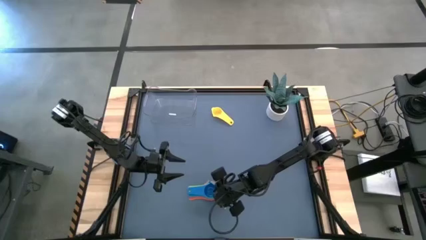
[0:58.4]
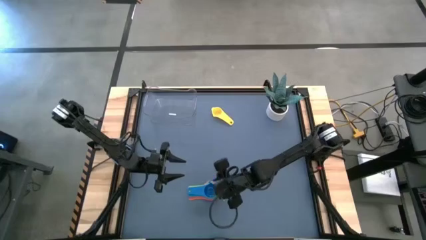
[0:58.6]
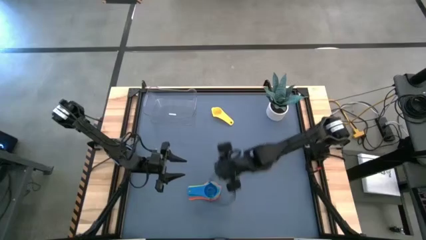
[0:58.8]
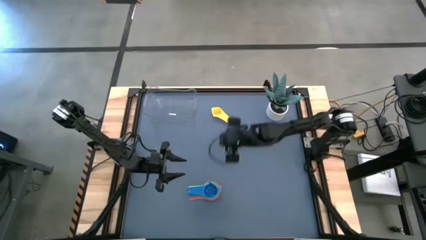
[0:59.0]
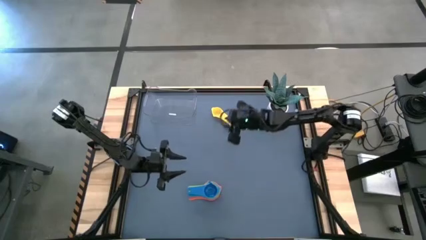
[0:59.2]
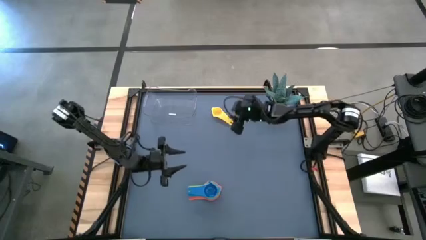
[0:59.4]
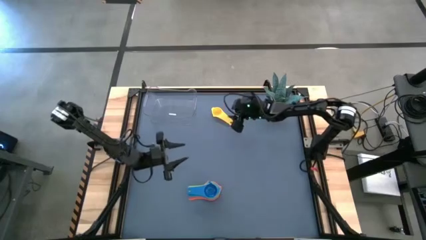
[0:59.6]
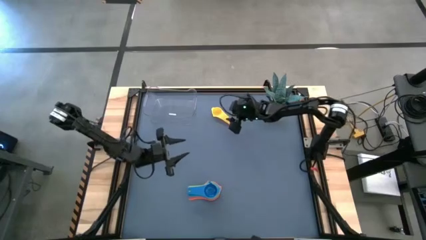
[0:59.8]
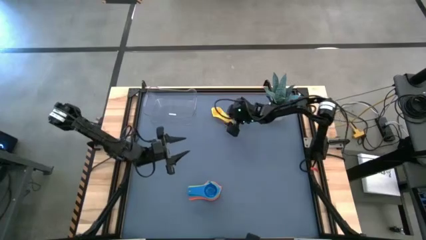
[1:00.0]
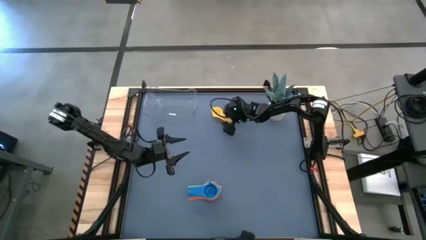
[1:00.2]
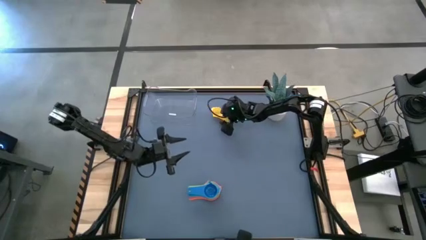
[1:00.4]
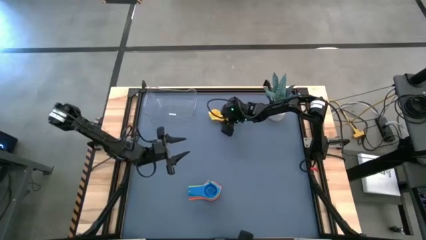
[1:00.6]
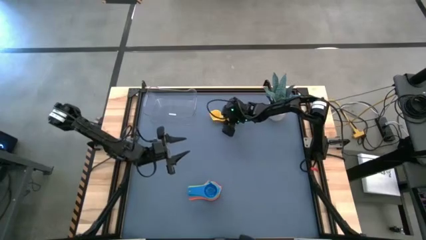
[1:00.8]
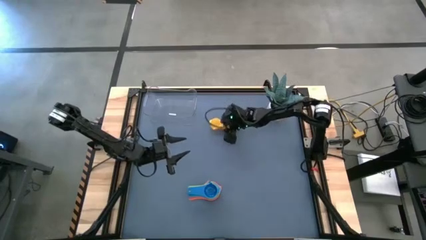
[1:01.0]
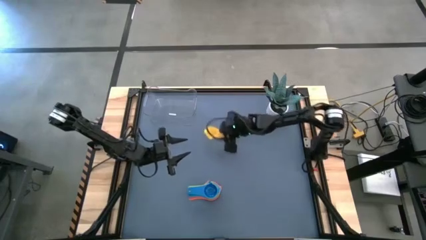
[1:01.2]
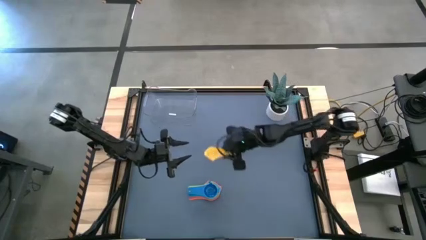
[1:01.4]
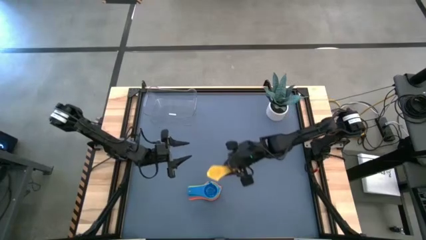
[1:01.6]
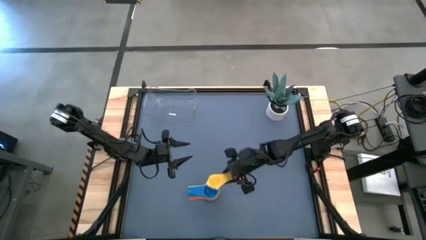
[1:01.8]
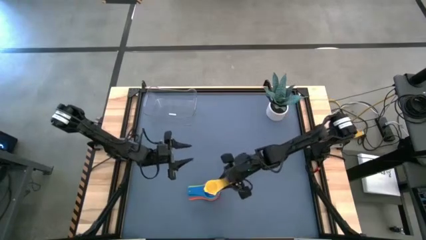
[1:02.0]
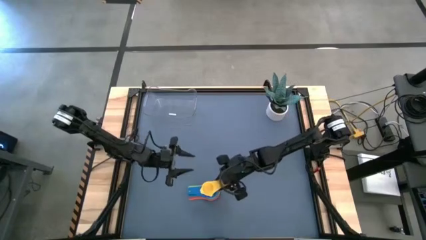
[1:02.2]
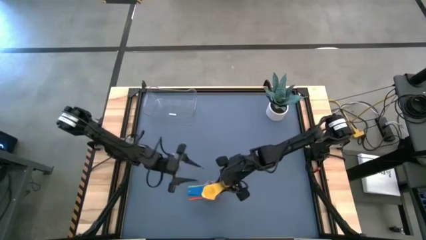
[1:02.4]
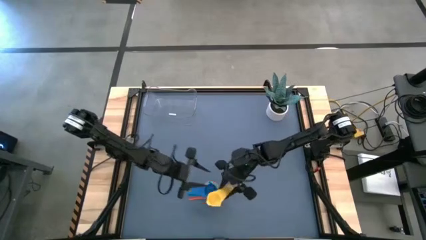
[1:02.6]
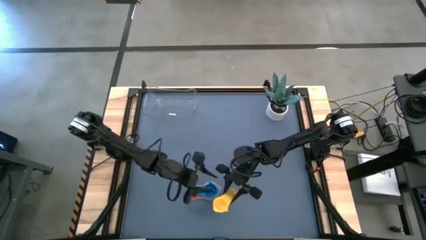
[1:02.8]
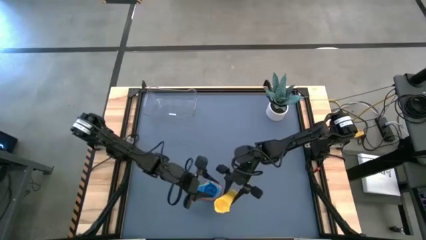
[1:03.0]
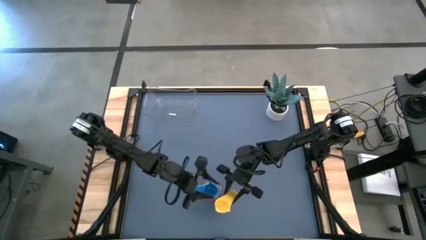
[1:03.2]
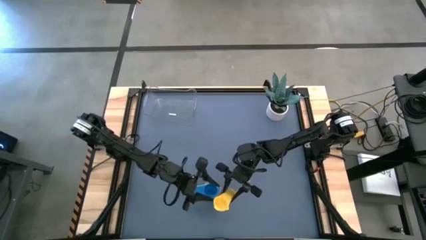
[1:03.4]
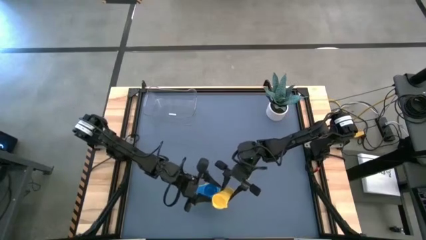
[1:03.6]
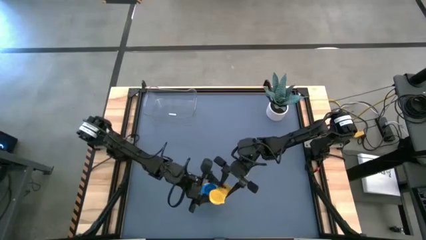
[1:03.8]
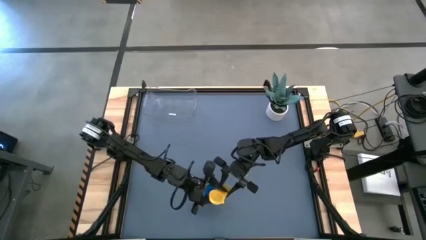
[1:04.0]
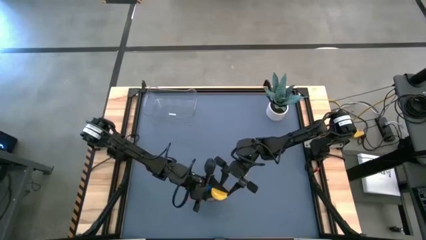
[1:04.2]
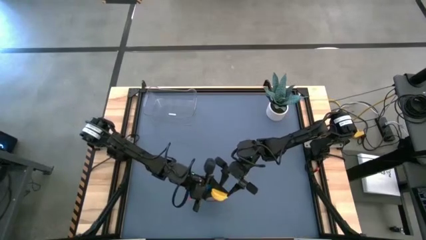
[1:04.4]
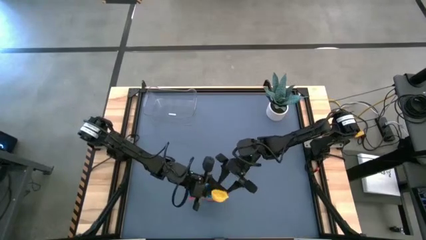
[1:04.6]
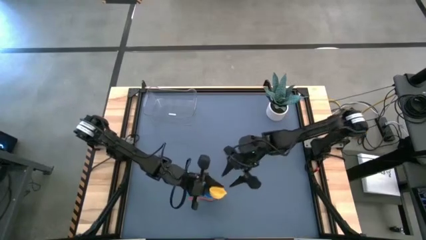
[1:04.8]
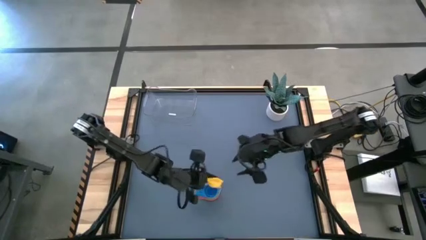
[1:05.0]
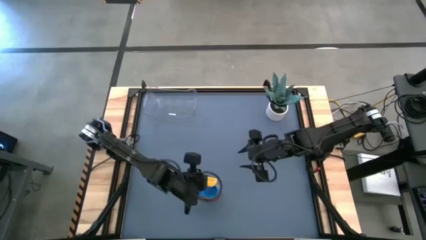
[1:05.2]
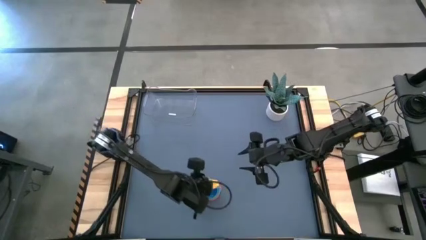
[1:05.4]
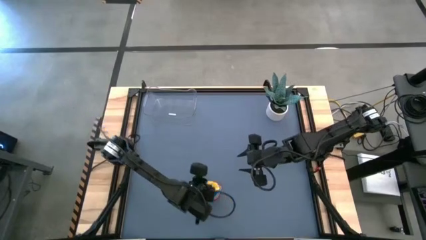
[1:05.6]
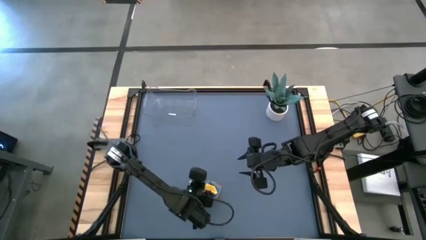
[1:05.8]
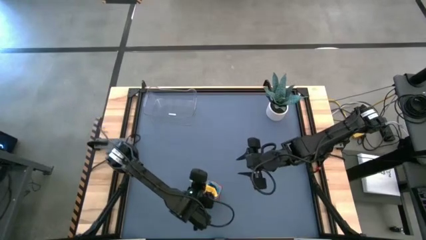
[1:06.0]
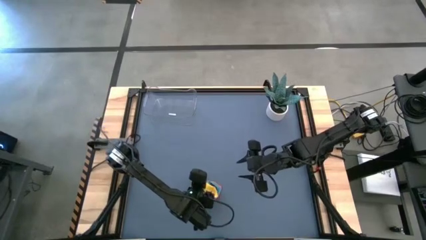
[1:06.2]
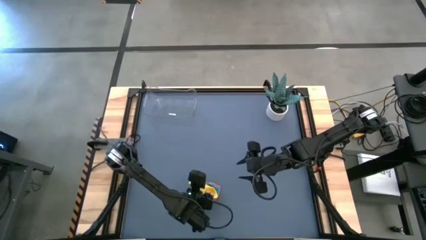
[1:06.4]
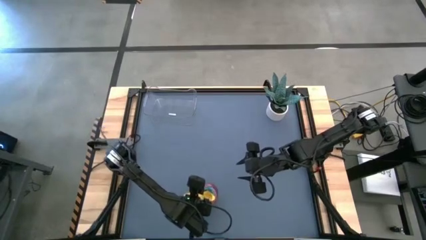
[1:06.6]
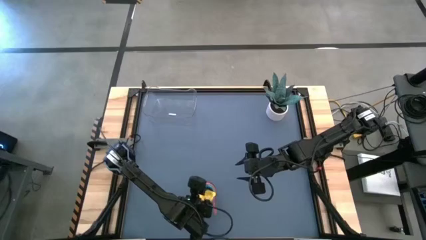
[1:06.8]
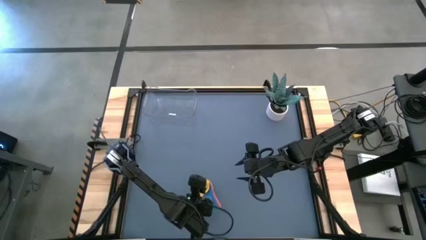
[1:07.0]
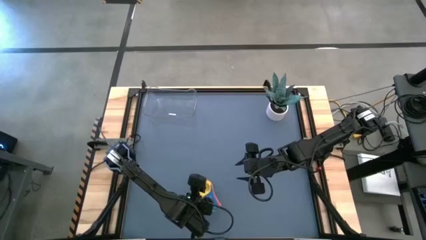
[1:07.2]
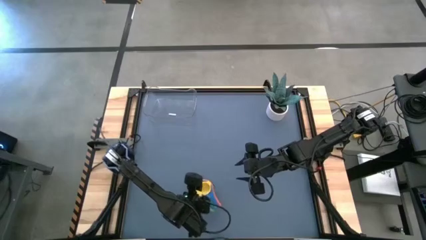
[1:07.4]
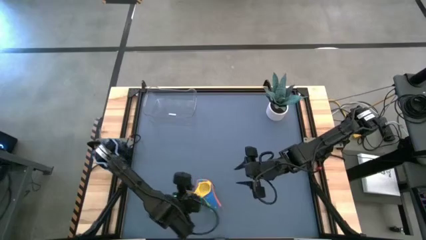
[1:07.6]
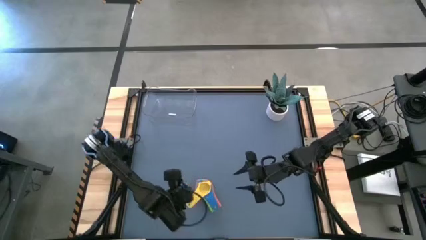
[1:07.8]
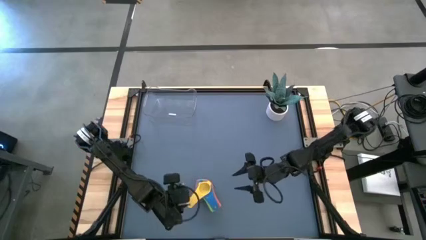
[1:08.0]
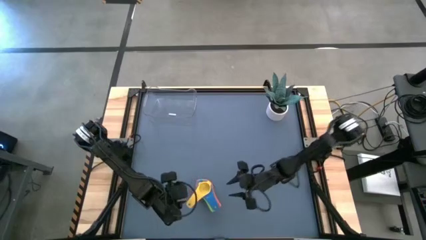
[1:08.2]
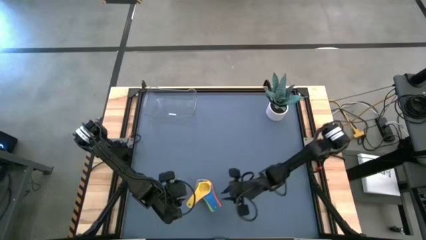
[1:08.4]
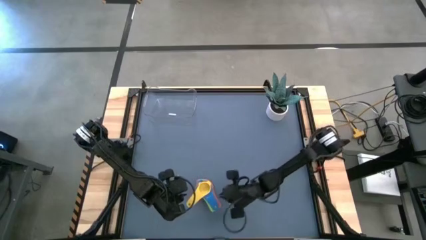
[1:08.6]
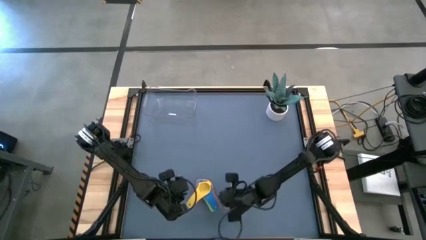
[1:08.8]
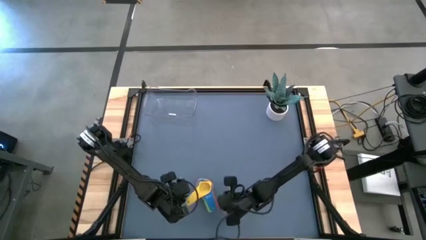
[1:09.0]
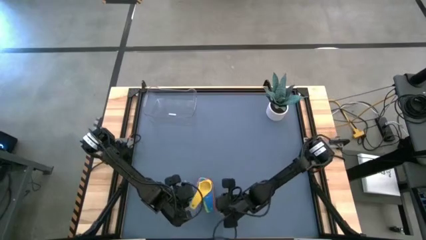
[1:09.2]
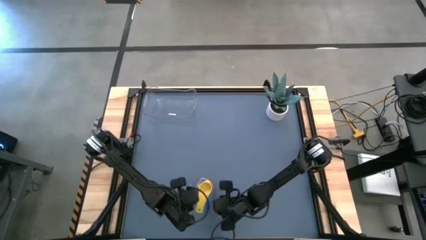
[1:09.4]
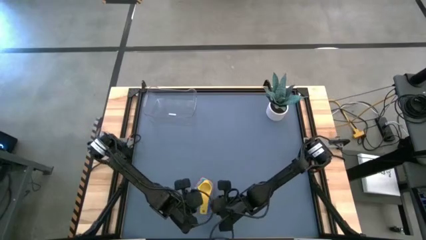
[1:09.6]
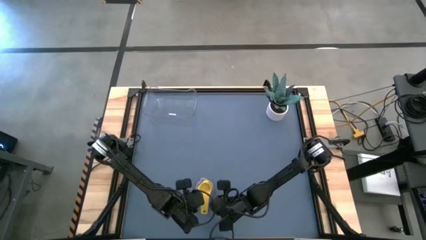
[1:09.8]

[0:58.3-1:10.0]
Task: Nest measuring cups in basket
Stack the yellow measuring cup on the top of the blue measuring cup

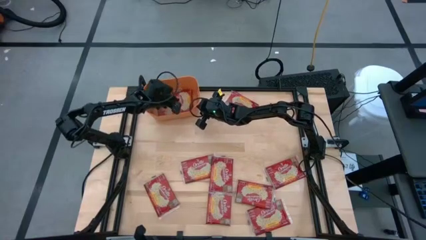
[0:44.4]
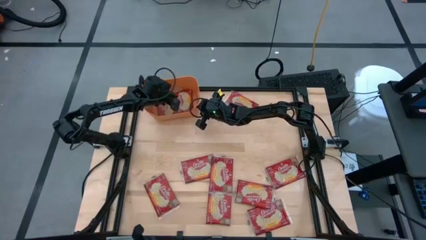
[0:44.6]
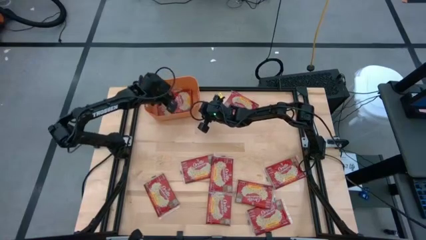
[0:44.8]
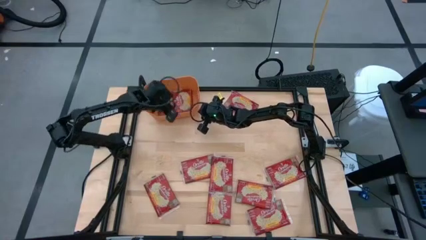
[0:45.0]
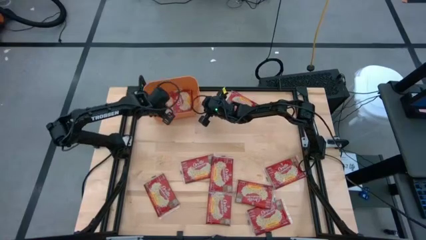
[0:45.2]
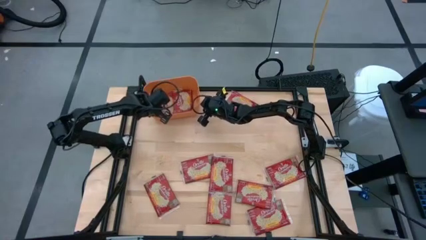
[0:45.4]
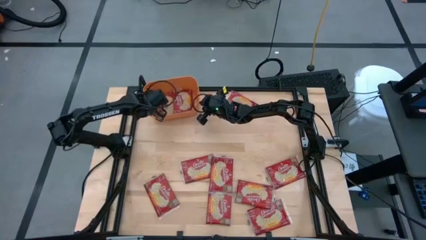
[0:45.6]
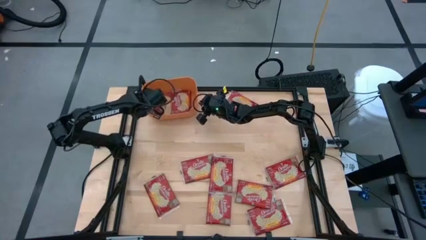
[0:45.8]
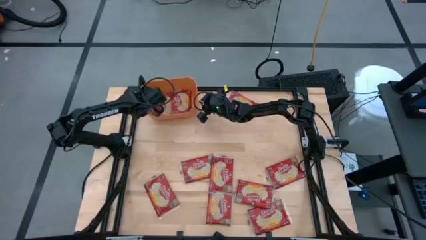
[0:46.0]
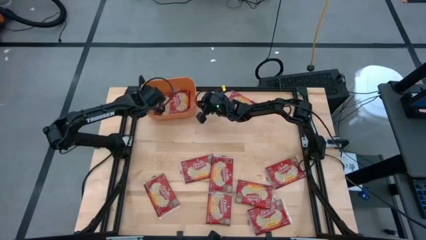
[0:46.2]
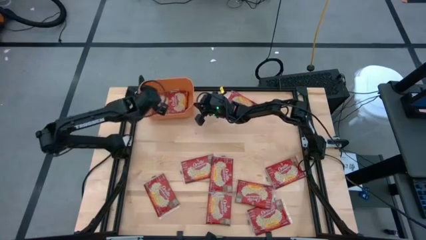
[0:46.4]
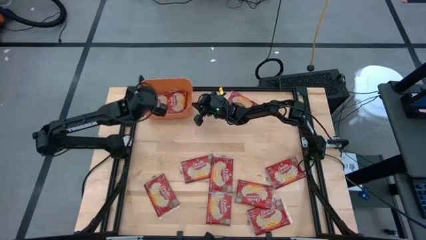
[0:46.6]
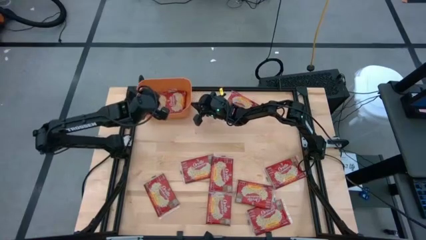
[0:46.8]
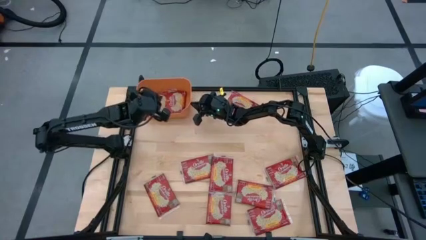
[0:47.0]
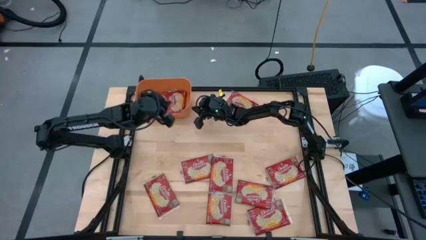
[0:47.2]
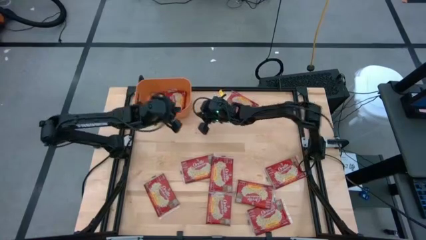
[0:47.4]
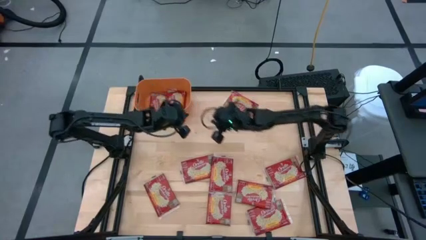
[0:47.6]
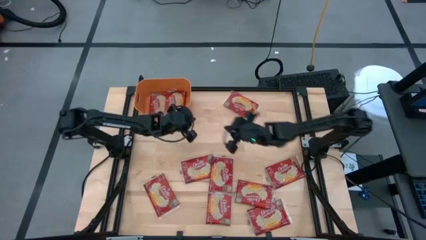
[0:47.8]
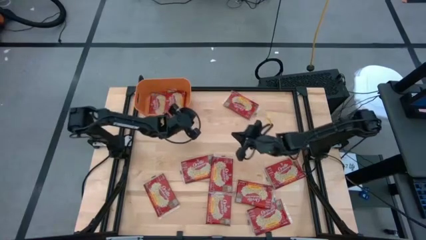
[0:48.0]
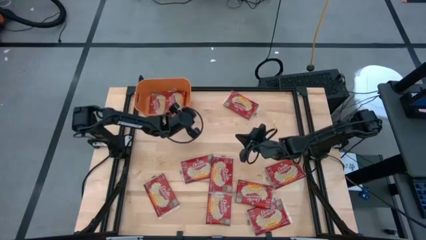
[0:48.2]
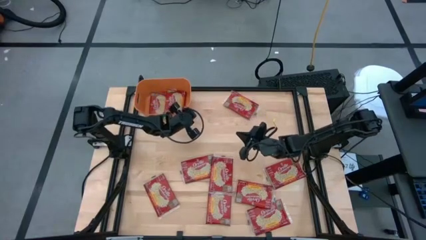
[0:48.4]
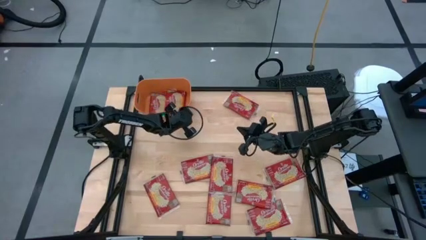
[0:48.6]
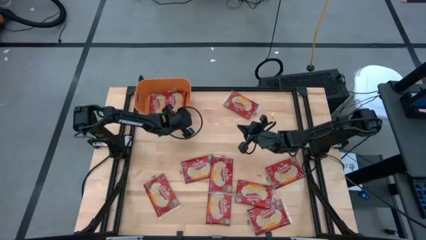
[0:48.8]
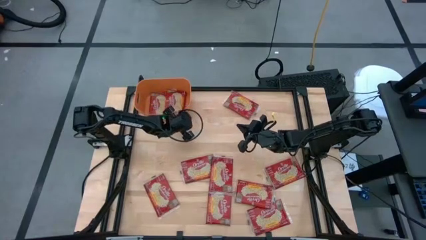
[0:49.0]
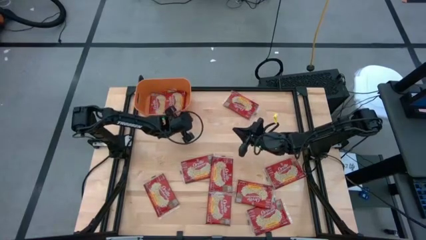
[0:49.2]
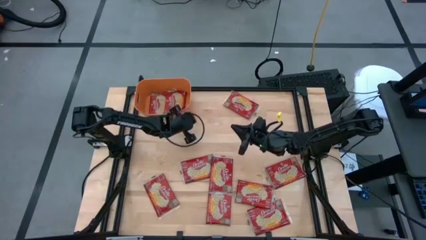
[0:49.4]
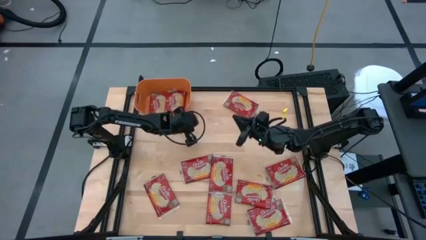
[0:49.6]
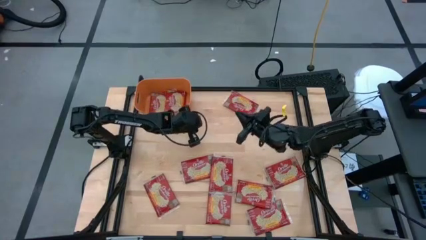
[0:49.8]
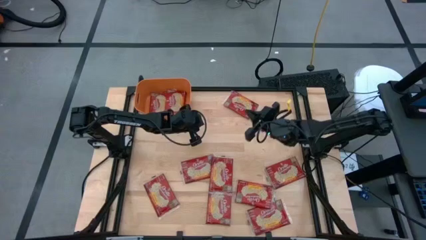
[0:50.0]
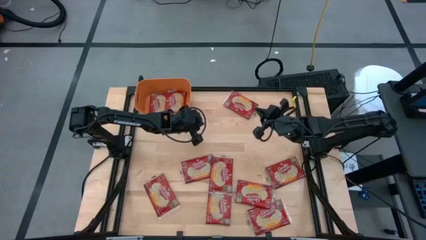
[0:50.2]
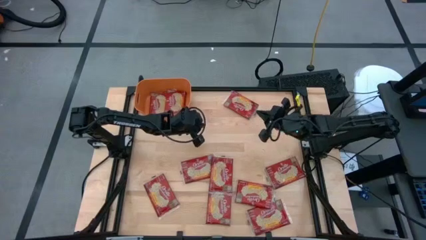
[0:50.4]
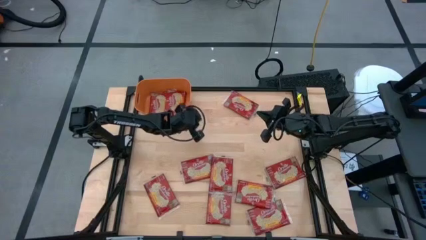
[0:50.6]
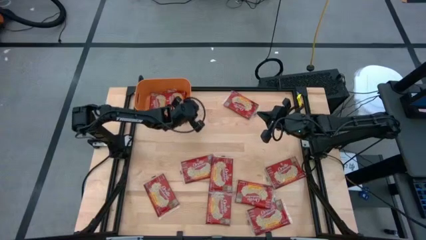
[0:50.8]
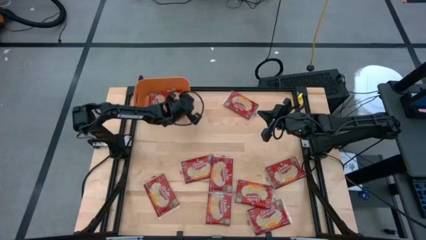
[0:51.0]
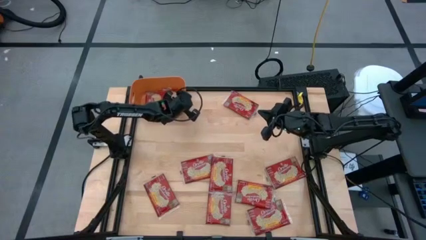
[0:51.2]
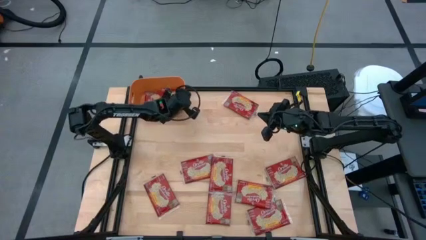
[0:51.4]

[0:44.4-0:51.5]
Task: Sort popcorn bags into baskets
Adjust the orange bin on the table
